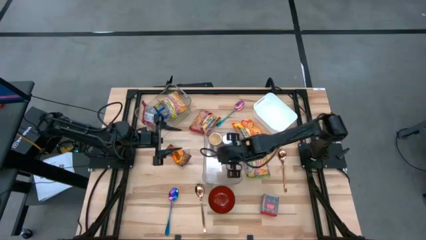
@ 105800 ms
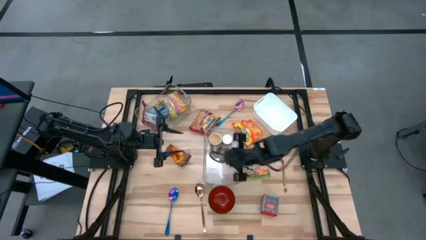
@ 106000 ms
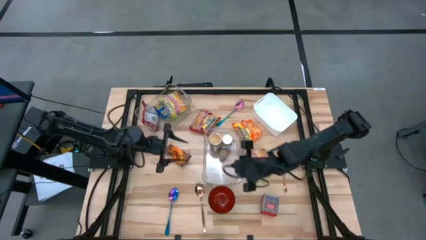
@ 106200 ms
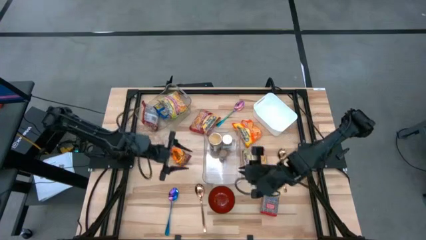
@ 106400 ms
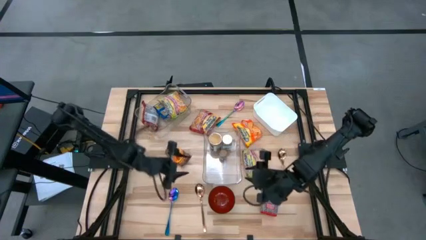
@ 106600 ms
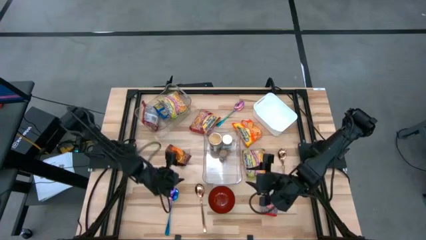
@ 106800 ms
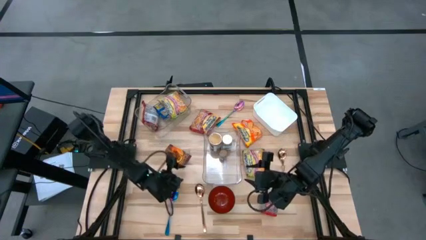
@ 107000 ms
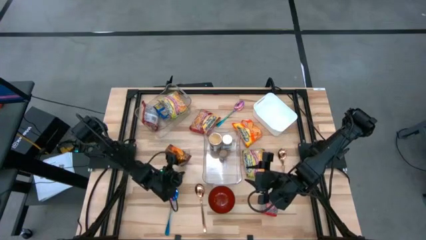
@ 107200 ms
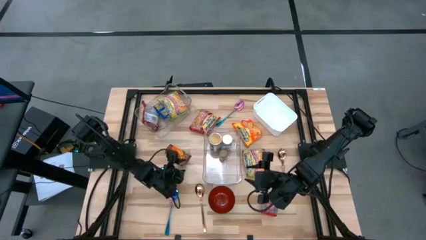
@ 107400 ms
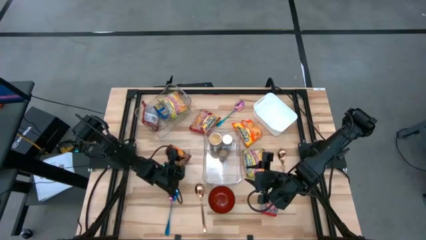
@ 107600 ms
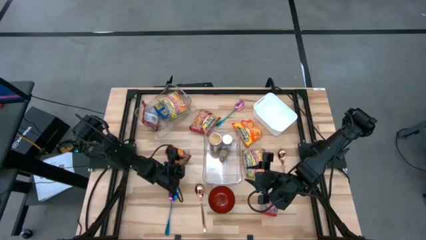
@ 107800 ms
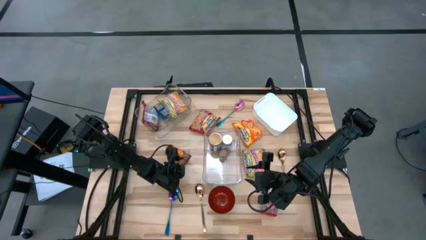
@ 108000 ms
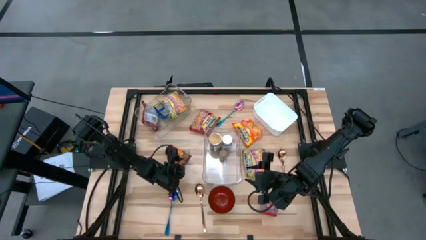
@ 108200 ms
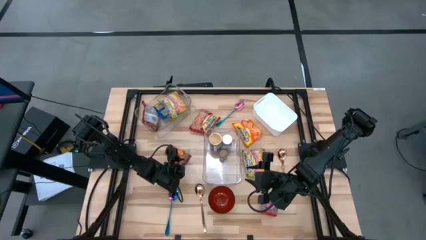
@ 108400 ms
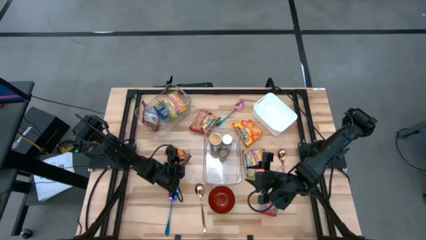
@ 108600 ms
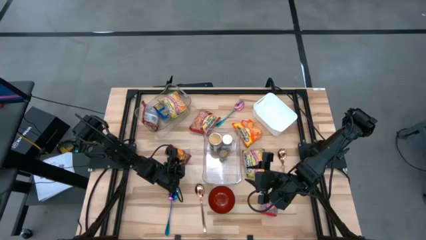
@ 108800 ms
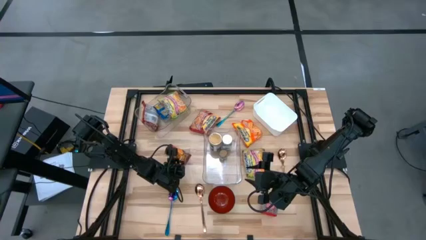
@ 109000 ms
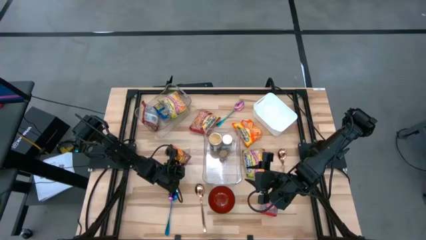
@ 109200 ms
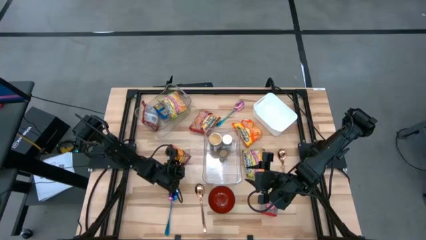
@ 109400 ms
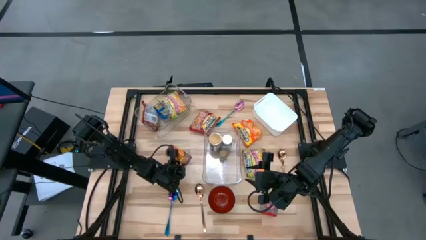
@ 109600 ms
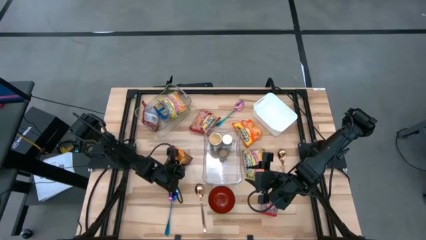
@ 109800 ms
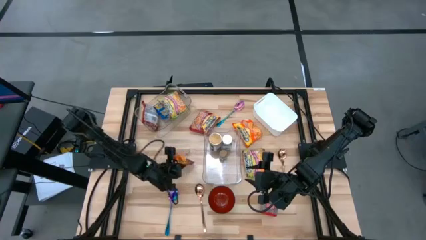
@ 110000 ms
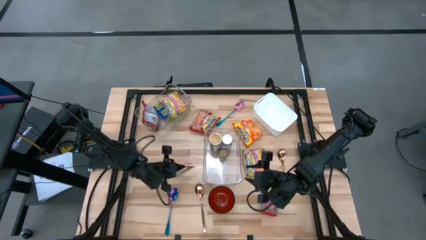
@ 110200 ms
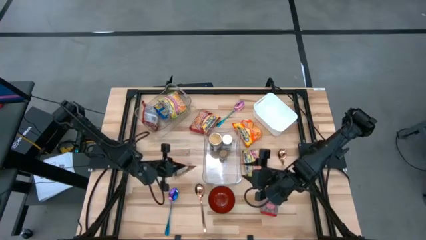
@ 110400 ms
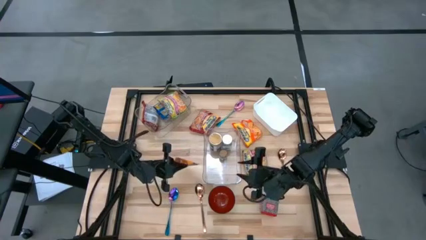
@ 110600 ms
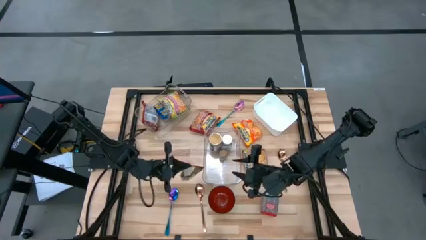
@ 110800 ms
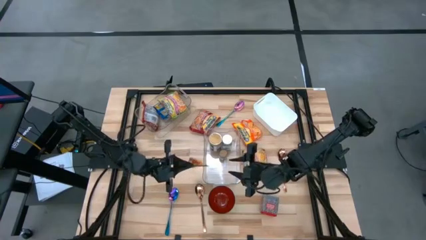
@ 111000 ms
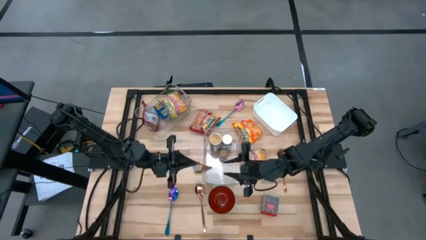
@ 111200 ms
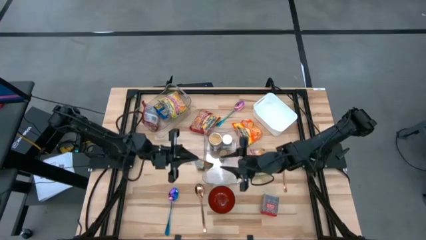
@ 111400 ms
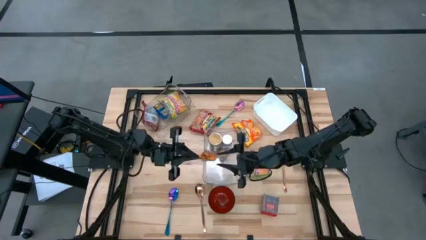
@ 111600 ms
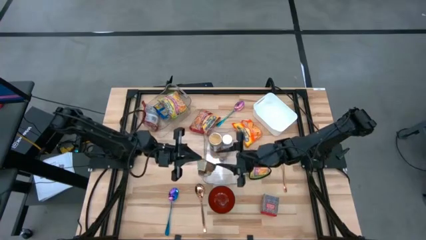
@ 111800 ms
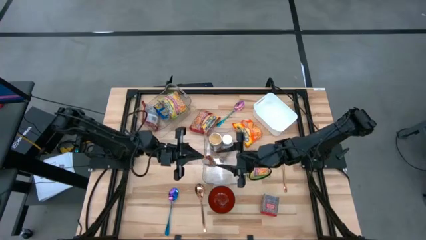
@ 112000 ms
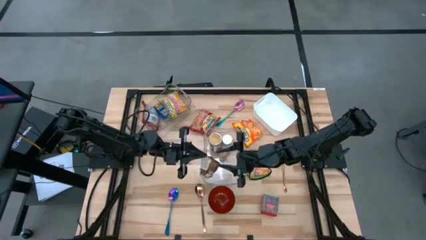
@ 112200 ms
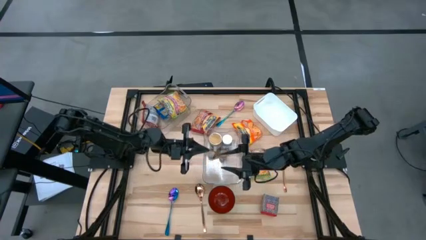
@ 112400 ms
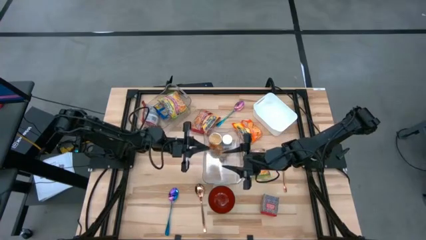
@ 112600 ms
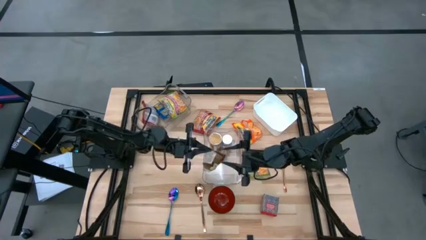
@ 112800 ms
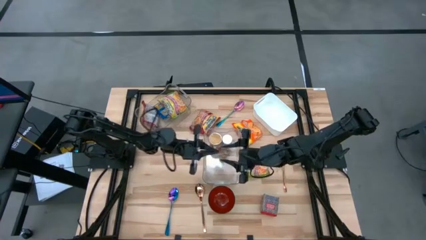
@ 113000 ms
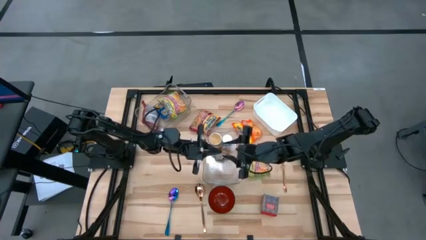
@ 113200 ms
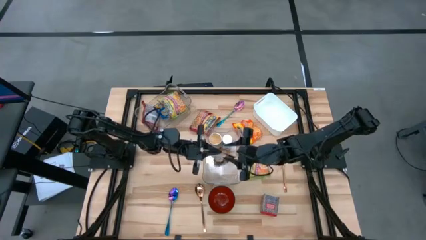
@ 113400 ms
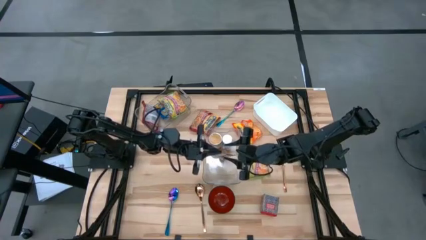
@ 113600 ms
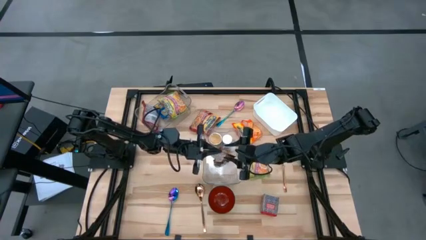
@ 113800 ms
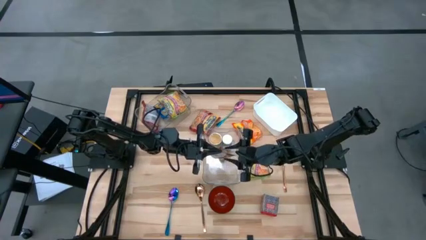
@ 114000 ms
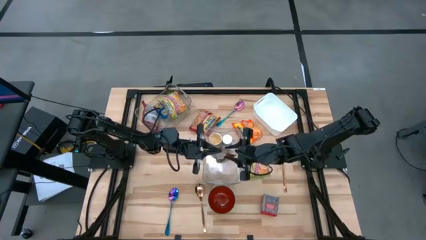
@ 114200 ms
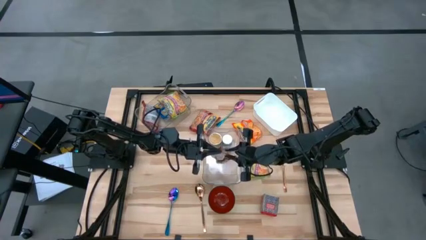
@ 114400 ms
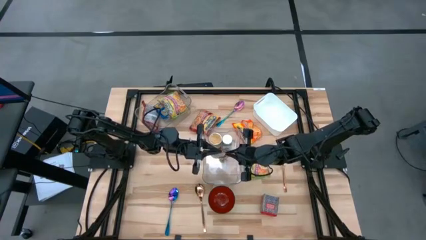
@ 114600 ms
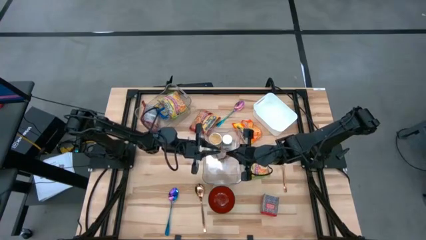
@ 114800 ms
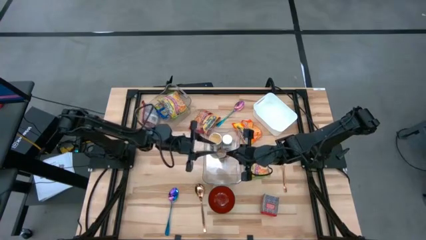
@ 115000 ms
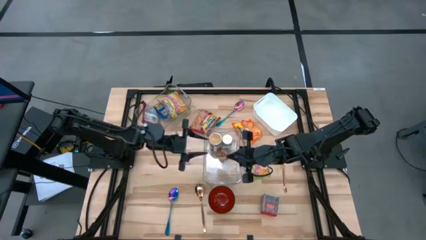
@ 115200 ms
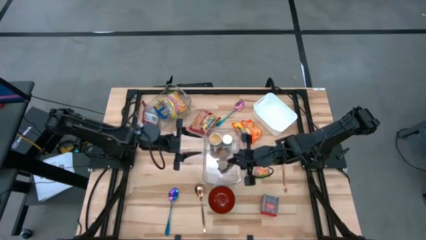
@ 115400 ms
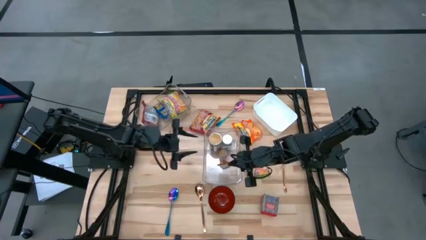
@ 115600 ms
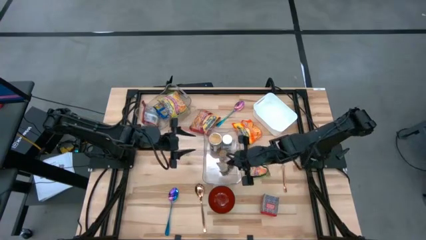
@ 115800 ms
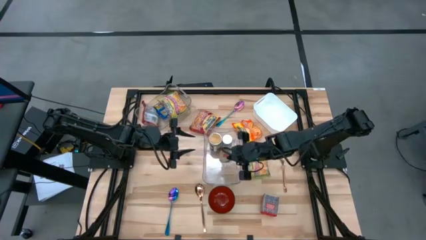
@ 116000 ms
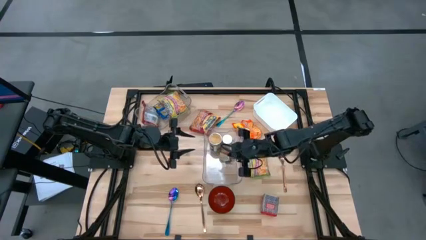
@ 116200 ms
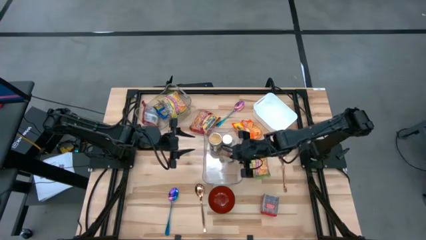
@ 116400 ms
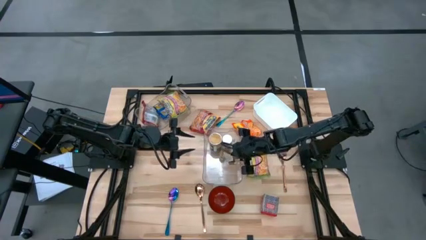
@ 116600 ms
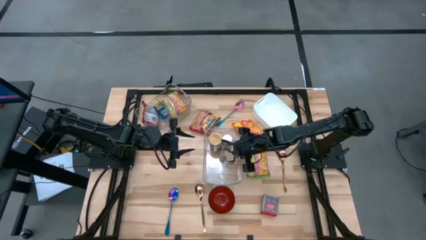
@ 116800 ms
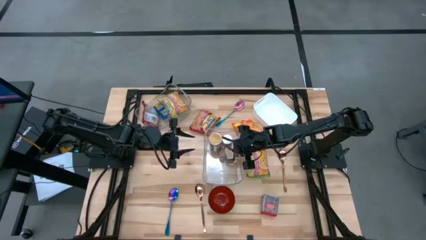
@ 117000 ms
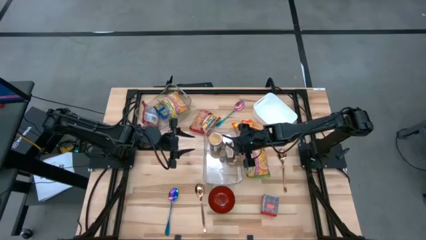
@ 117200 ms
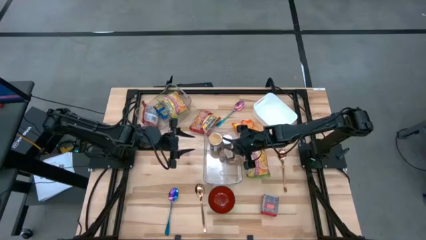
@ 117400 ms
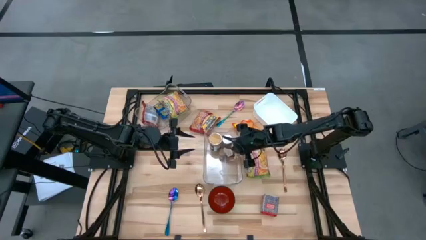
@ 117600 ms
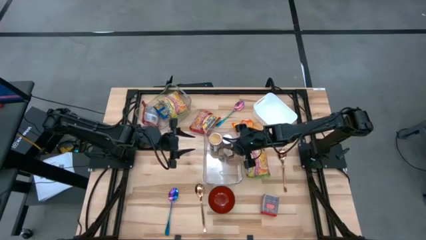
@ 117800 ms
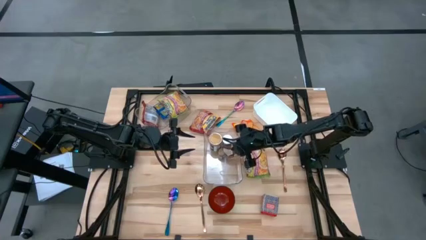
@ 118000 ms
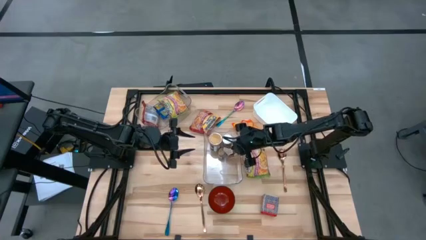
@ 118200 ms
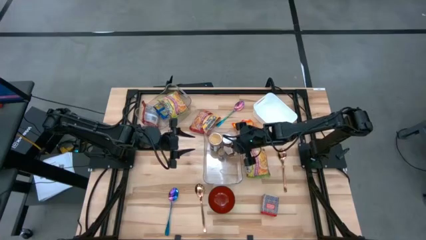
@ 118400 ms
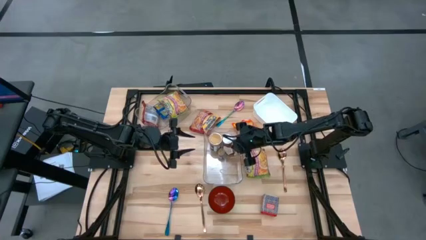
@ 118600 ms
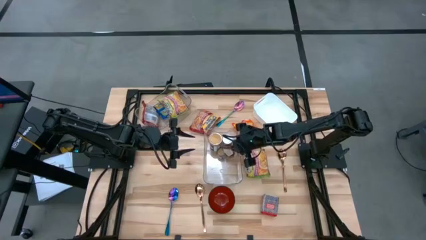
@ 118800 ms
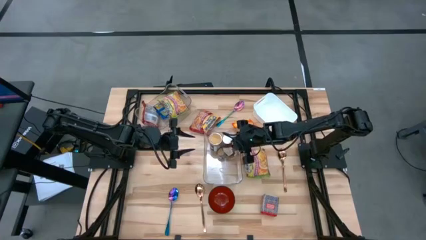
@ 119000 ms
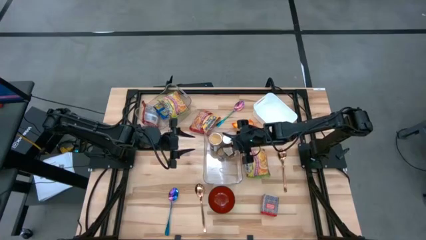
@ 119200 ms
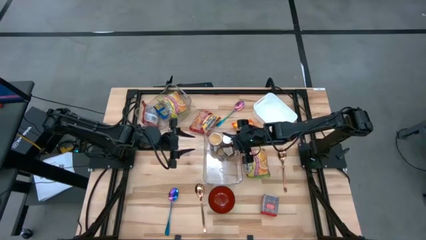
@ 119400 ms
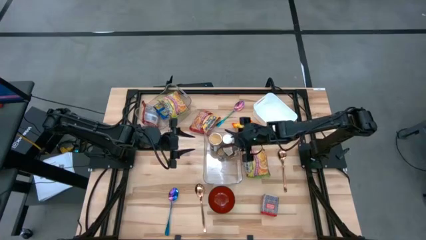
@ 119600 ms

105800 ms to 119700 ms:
Task: Pick & Place Food Item
Put the orange spice pack into the bottom transparent bin

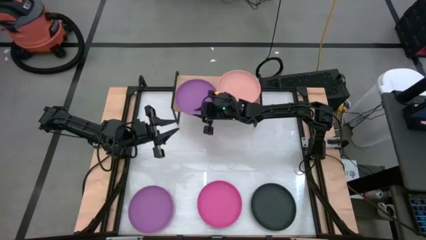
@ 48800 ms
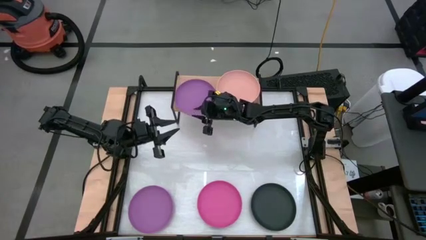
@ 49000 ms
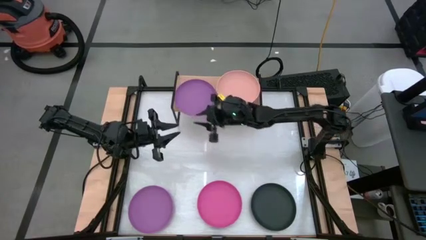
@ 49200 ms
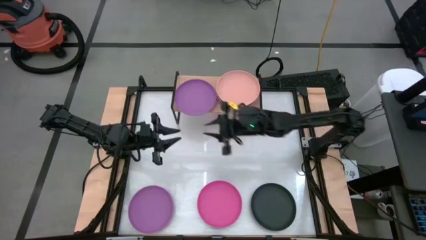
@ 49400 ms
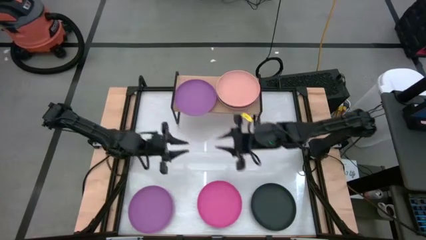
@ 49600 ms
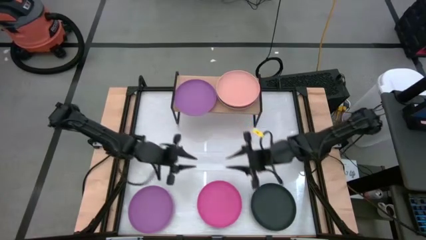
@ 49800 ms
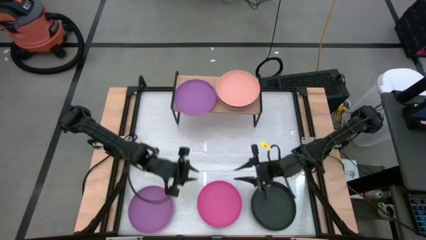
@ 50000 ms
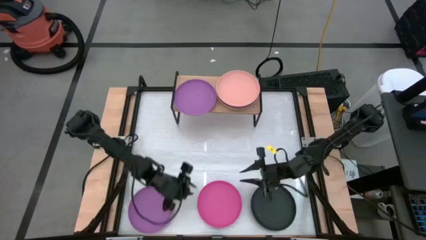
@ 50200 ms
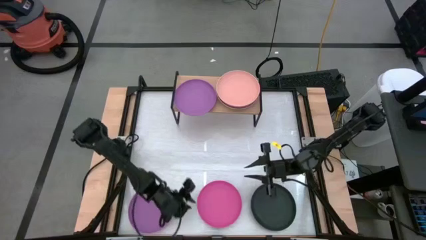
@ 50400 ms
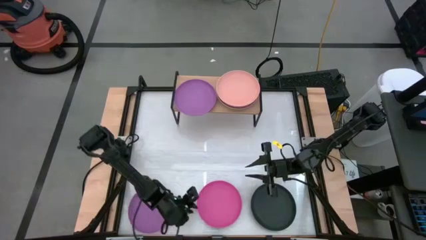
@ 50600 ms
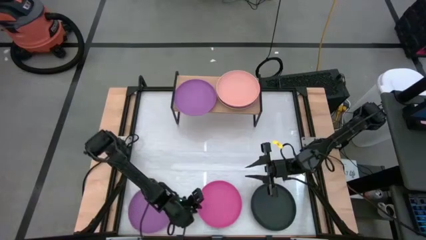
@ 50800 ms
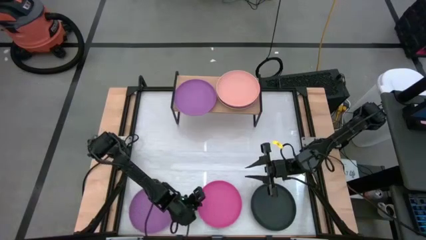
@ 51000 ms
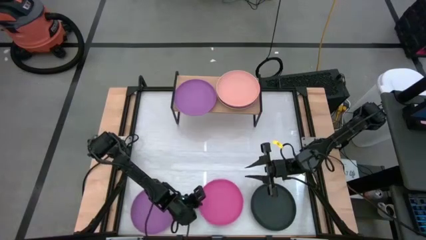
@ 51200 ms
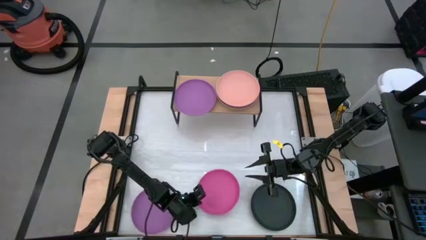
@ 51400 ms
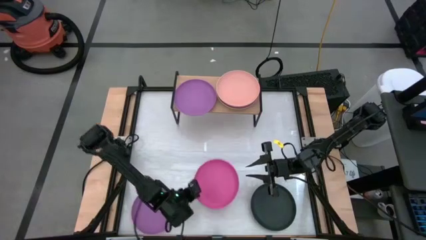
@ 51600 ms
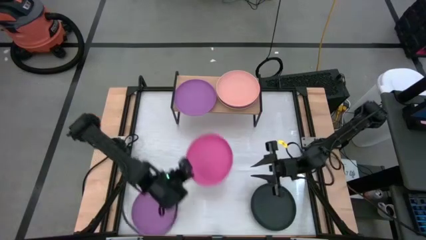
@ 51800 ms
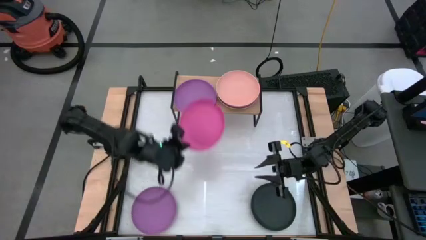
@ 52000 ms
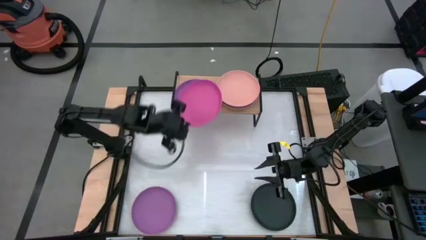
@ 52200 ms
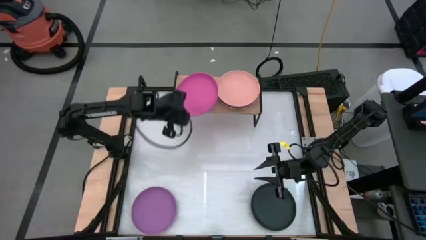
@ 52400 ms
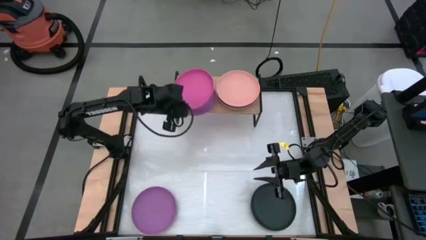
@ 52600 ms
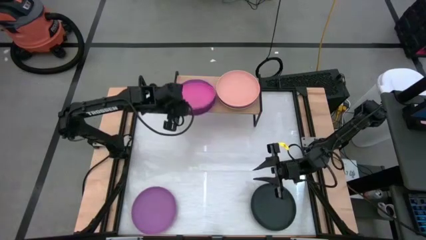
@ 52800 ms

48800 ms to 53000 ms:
Task: Place and stack plates onto a shelf
Stack the pink plate on top of the purple plate on the shelf
